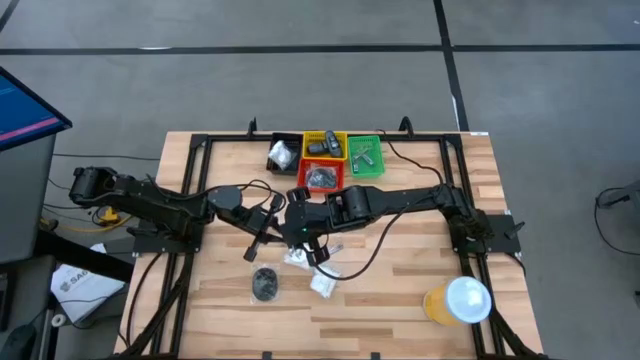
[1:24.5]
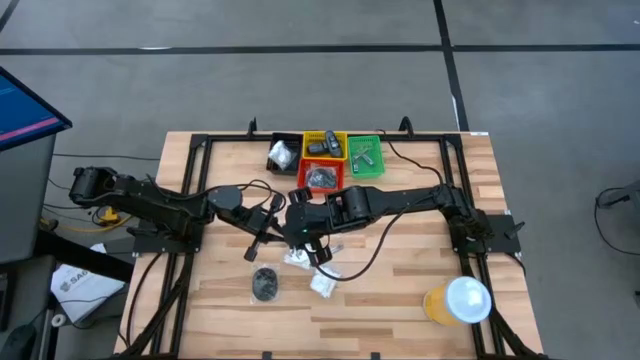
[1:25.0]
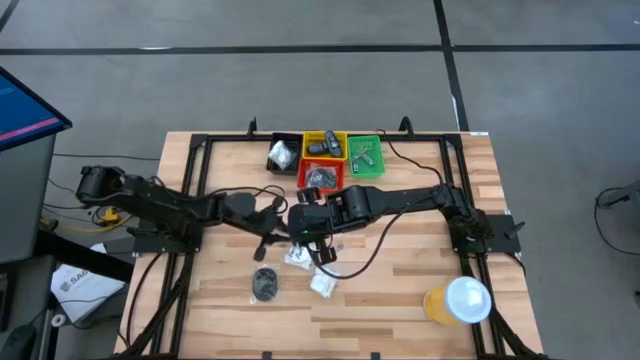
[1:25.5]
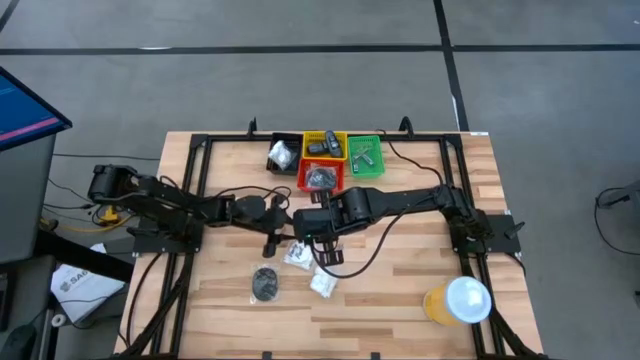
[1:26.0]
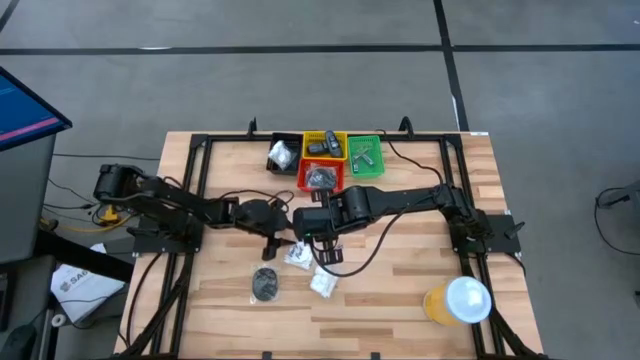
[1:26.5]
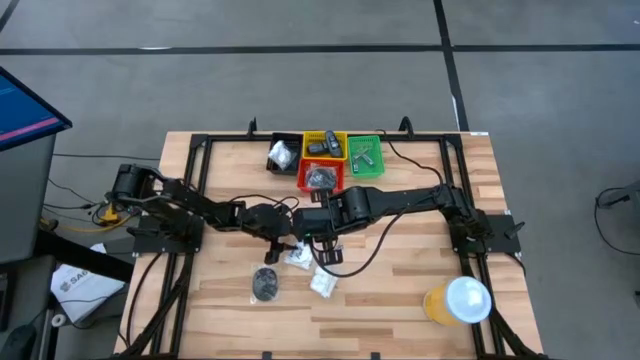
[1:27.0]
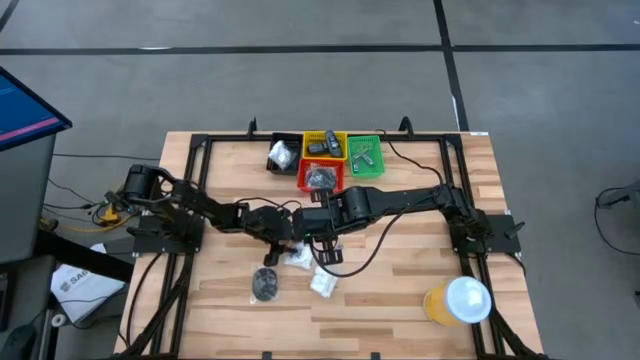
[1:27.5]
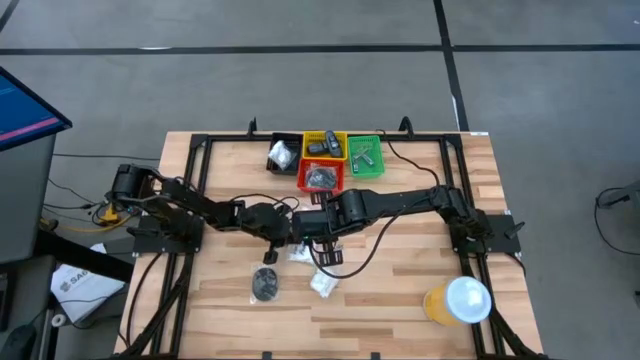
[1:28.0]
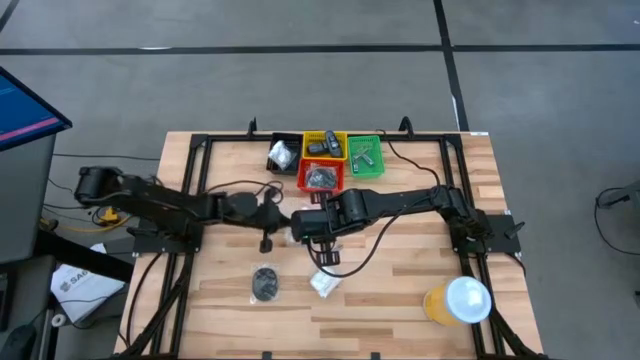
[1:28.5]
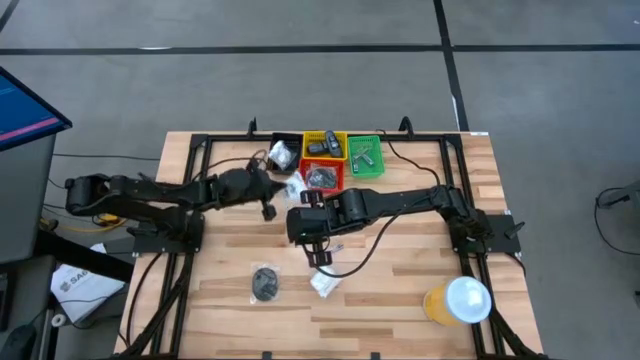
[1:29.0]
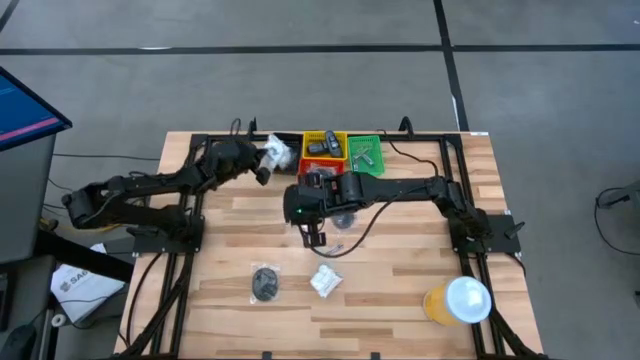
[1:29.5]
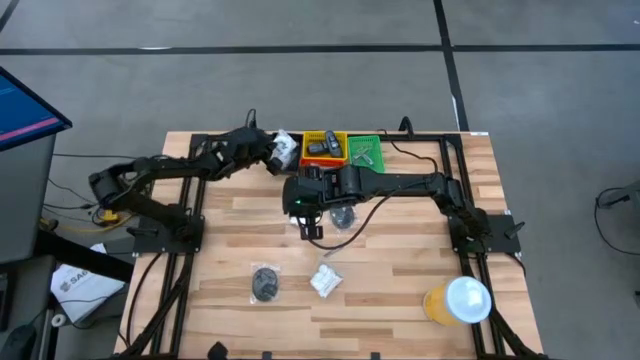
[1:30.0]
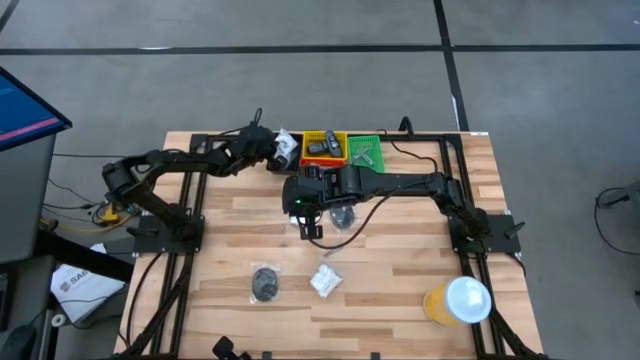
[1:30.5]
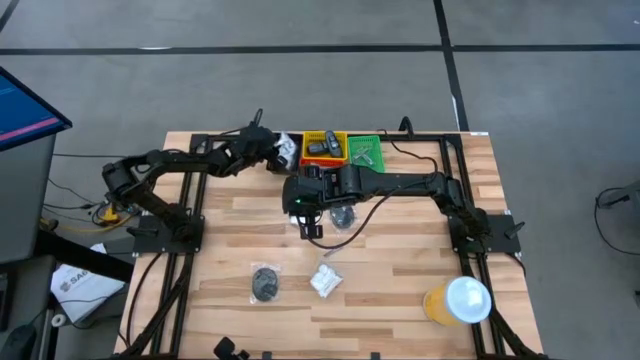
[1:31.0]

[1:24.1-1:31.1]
Task: Pick & Place Travel size toiletries
Put the cotton pack into the black bin

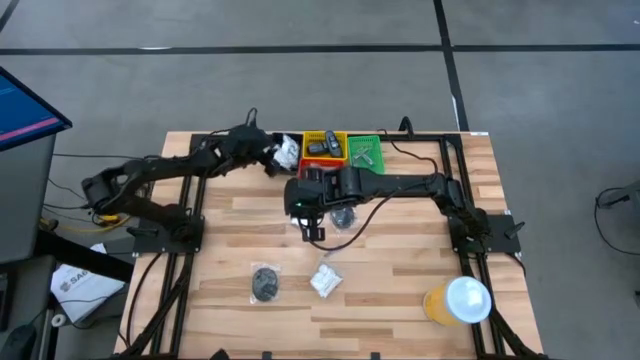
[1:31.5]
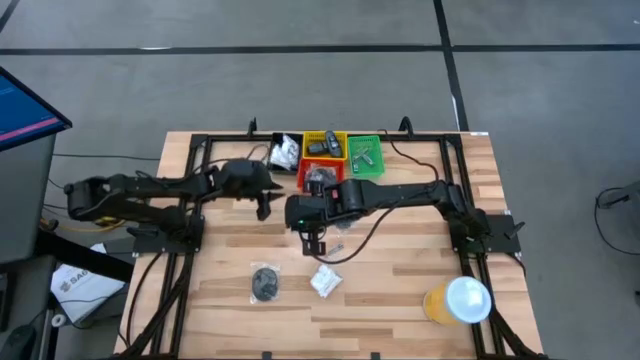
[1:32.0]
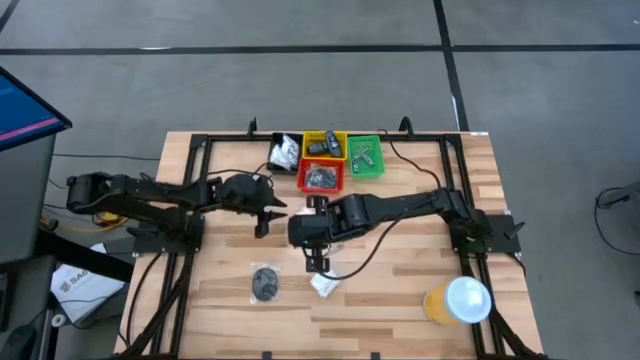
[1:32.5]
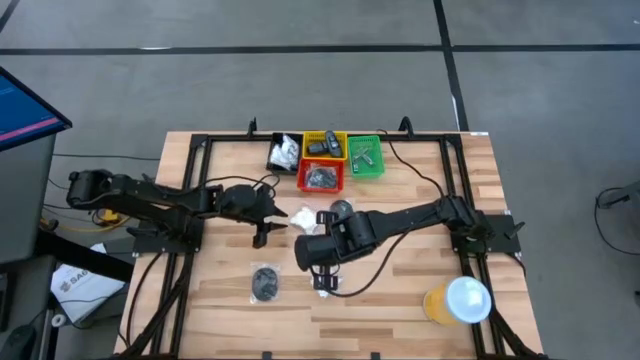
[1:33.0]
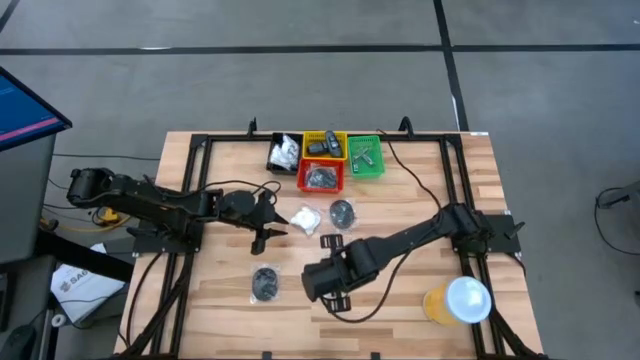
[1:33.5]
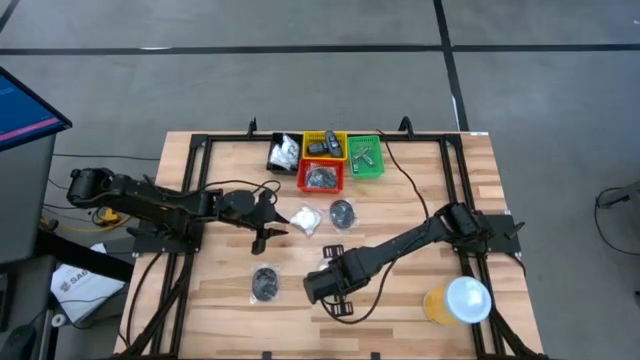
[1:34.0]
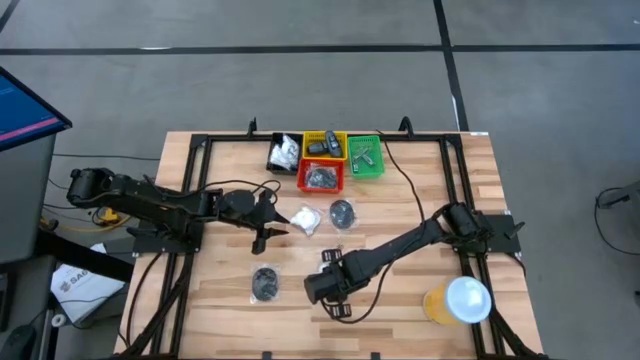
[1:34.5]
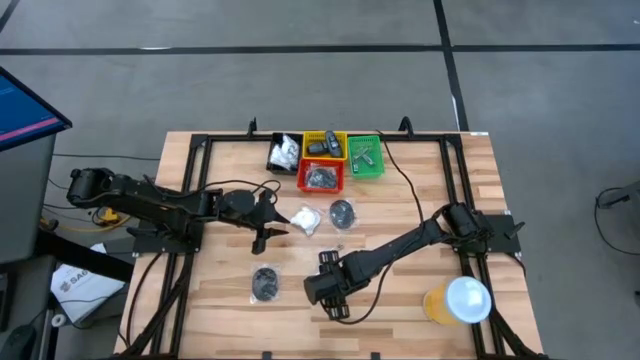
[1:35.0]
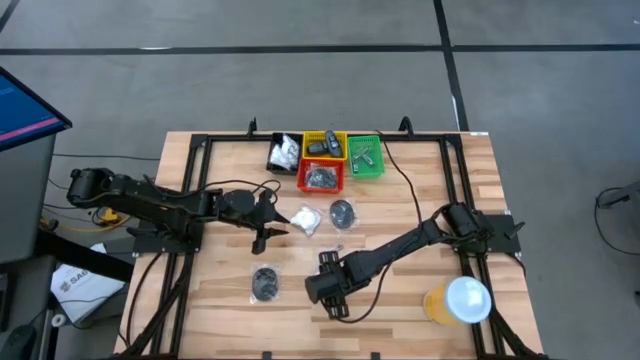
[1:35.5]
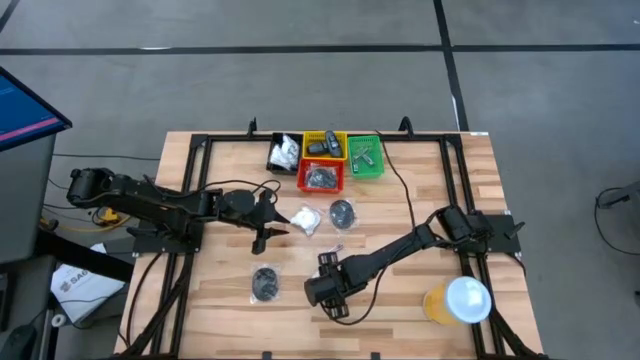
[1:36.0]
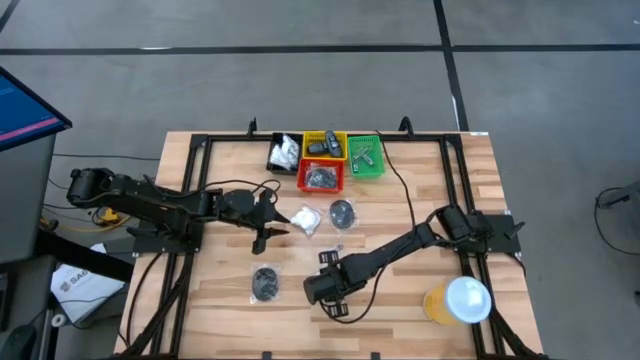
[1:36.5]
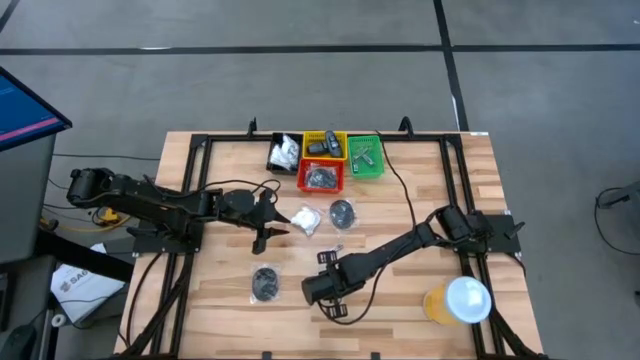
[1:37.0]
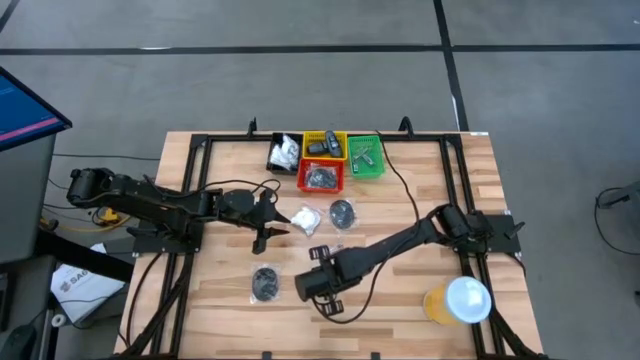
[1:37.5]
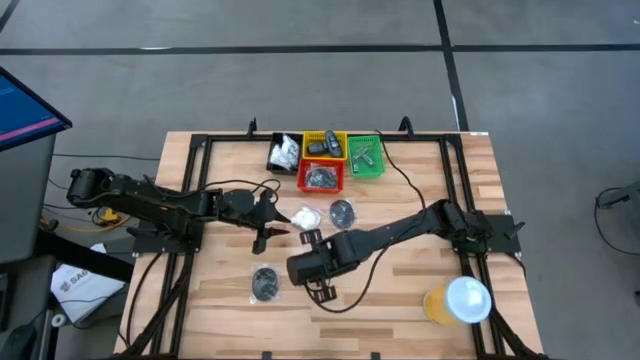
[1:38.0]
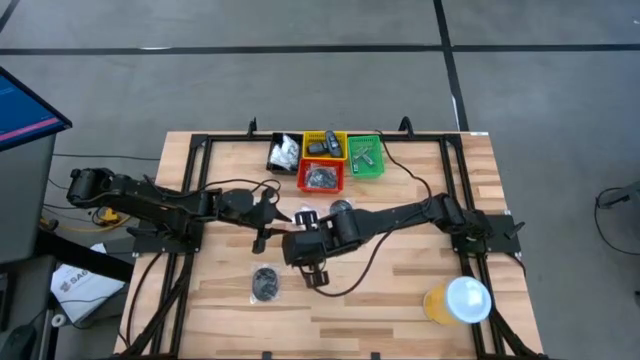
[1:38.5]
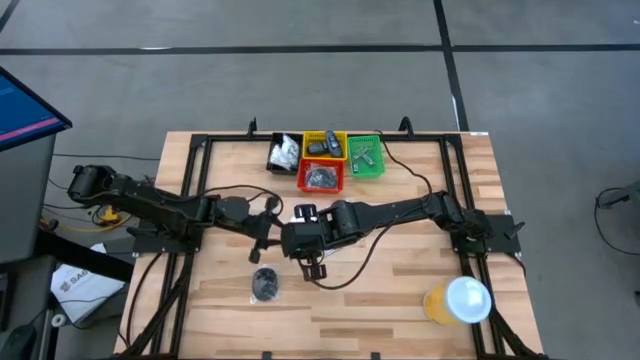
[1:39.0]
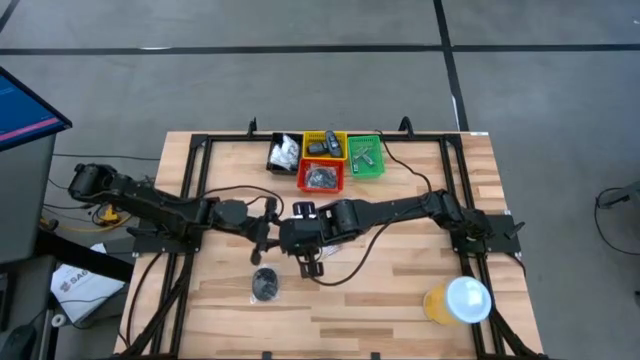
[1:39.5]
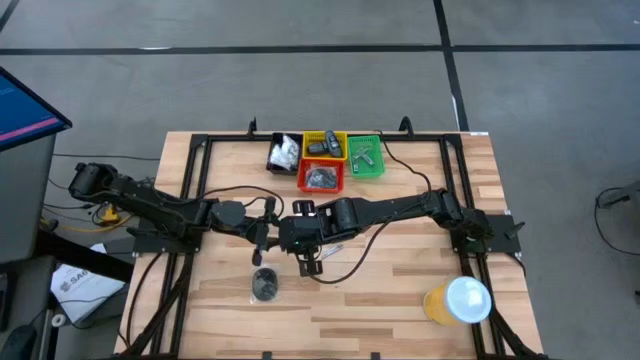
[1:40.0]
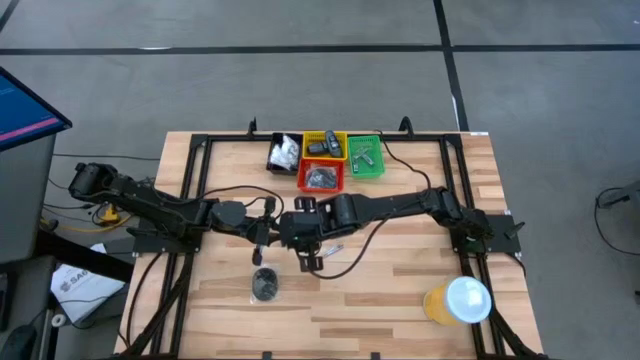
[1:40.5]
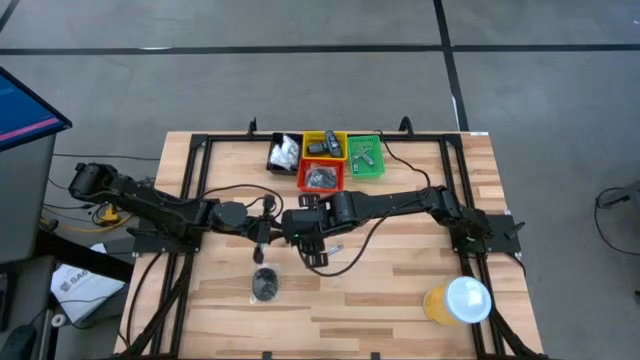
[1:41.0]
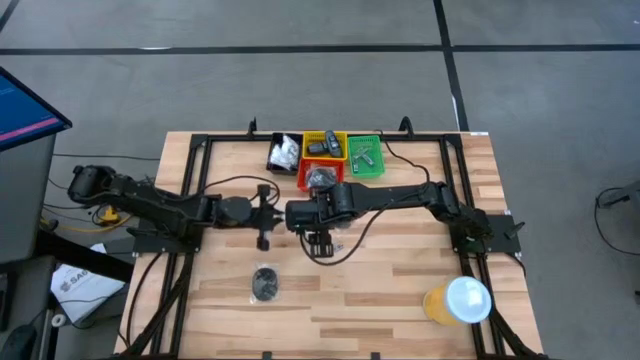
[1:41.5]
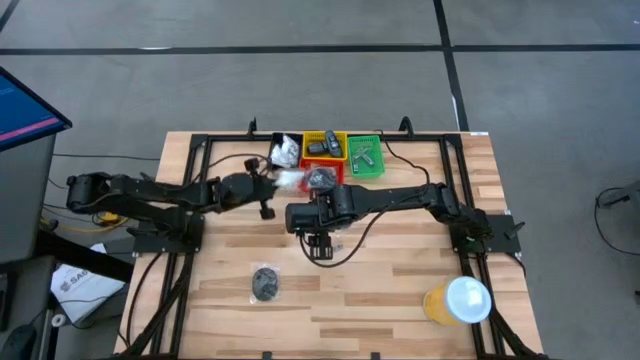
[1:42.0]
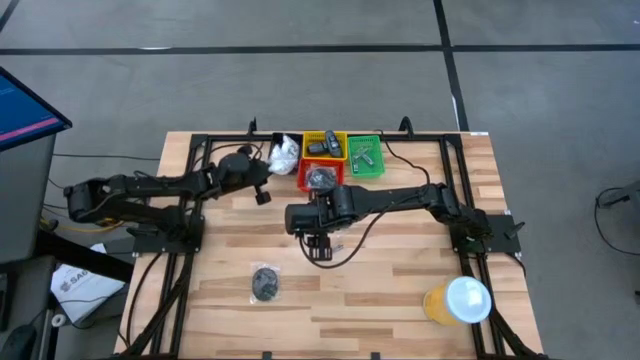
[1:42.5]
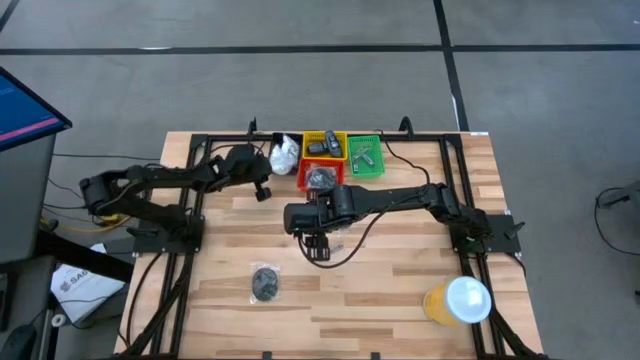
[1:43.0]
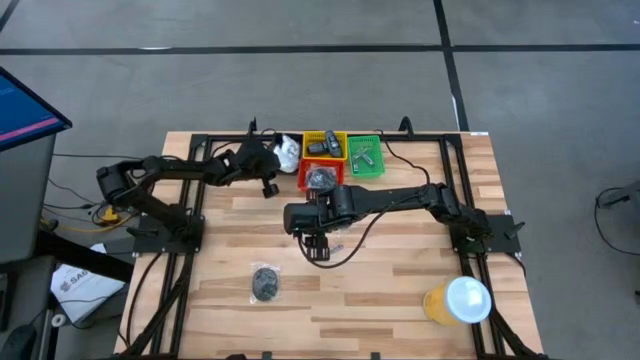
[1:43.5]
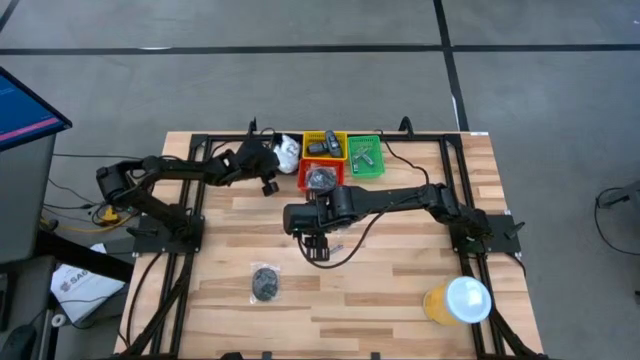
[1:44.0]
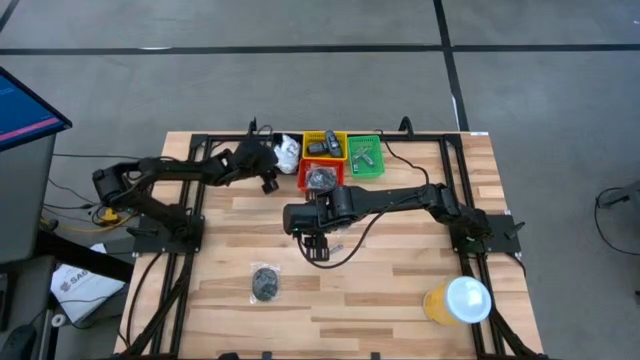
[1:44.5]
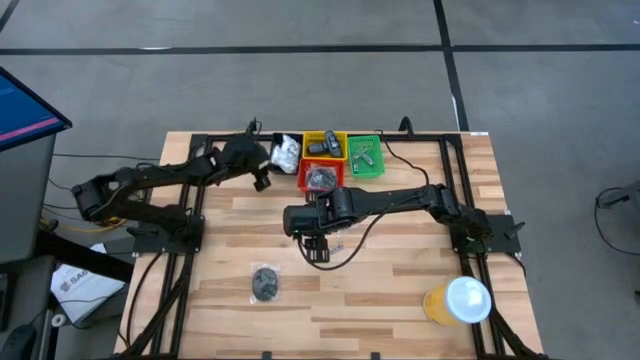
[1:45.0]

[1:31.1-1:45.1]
Put the cotton pack into the black bin

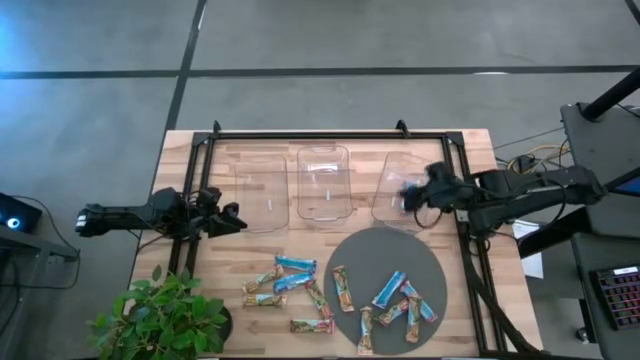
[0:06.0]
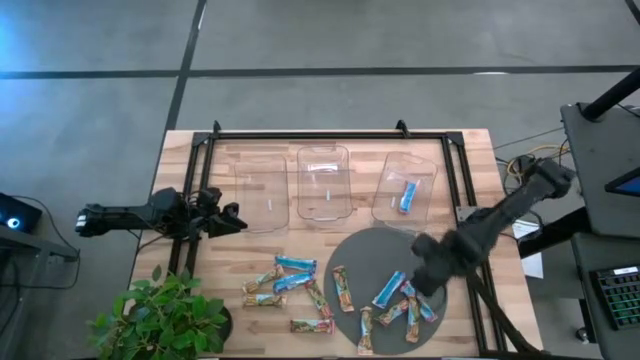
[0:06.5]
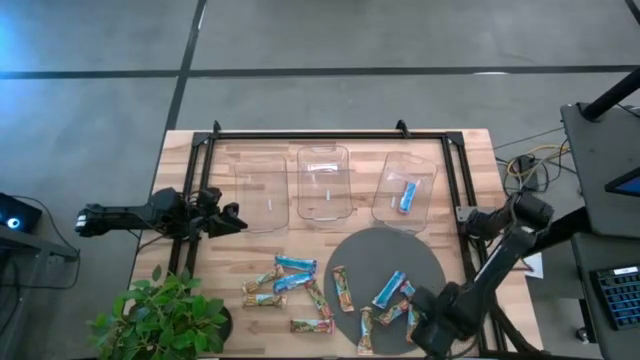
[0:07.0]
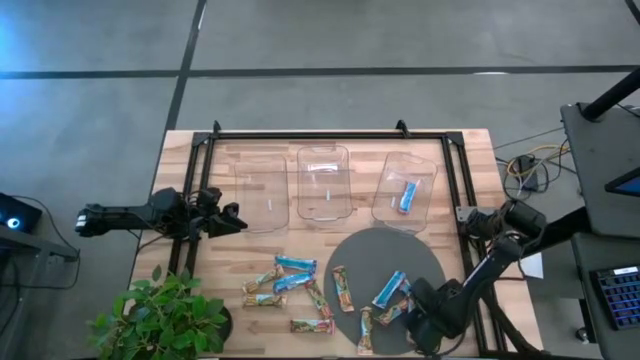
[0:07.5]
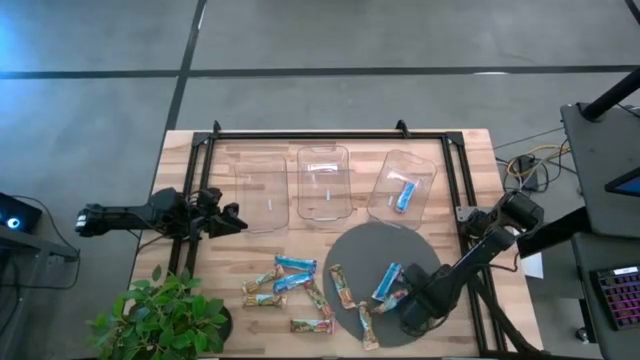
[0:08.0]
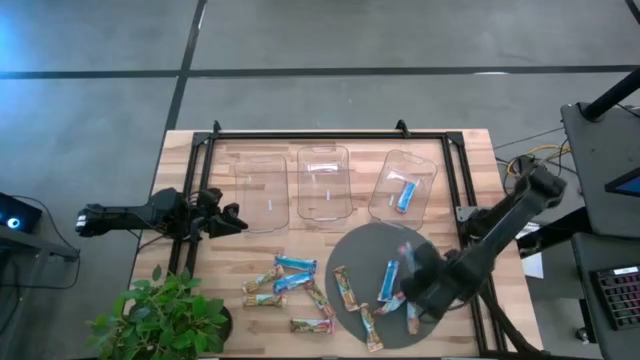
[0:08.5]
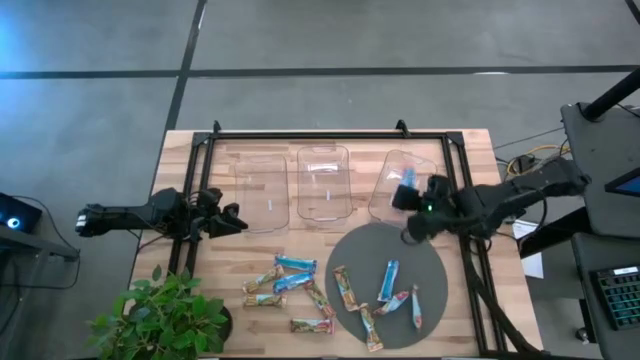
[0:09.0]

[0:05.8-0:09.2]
Task: Pick and place Granola Bars by type
Put the red granola bar into the right transparent bin
